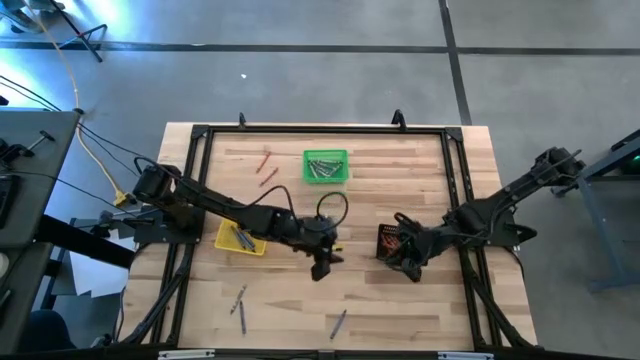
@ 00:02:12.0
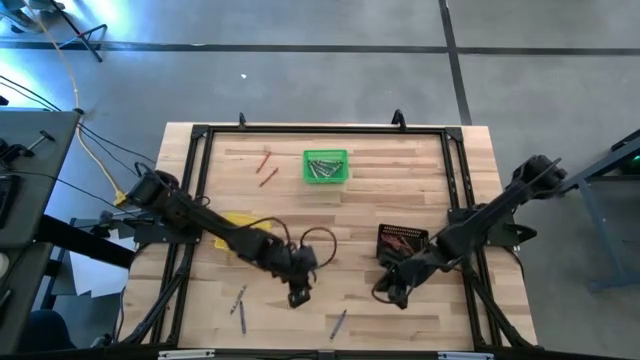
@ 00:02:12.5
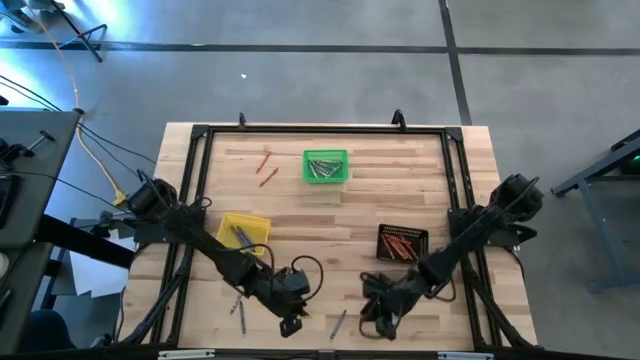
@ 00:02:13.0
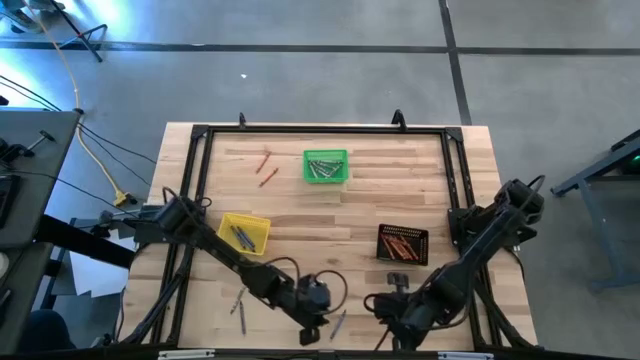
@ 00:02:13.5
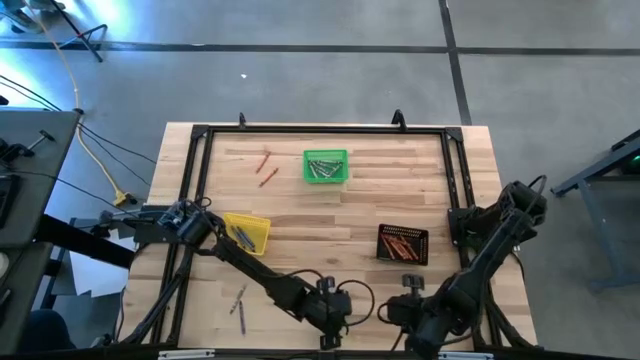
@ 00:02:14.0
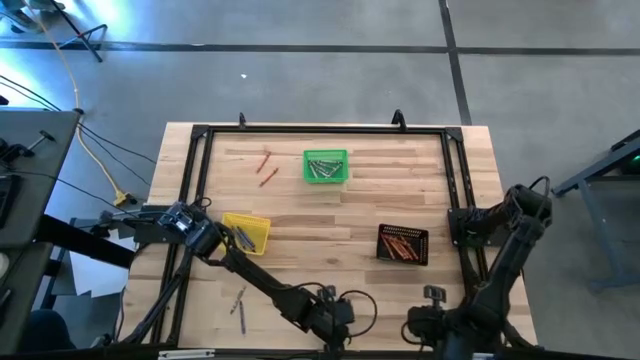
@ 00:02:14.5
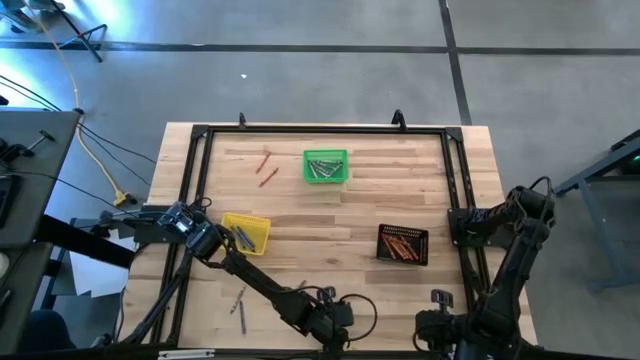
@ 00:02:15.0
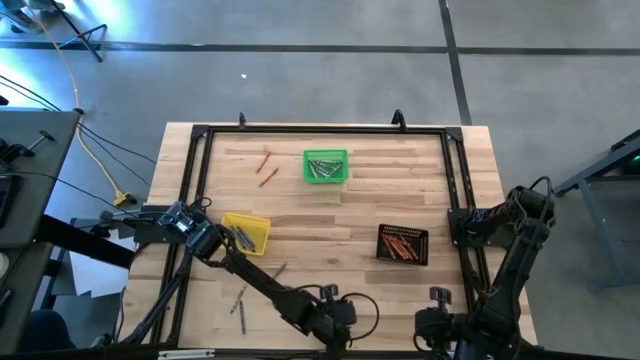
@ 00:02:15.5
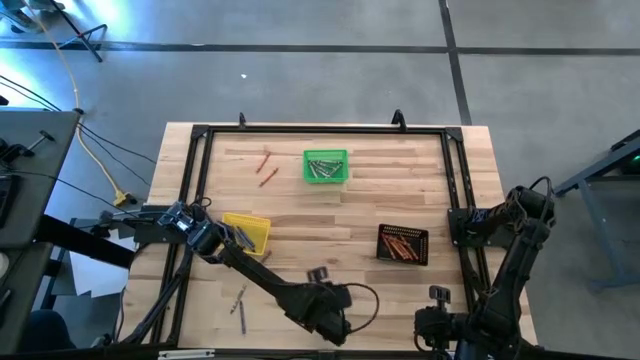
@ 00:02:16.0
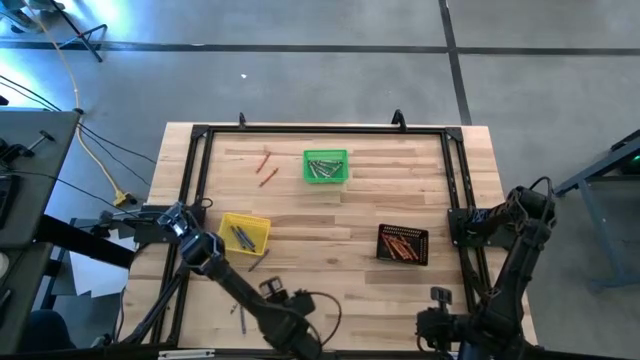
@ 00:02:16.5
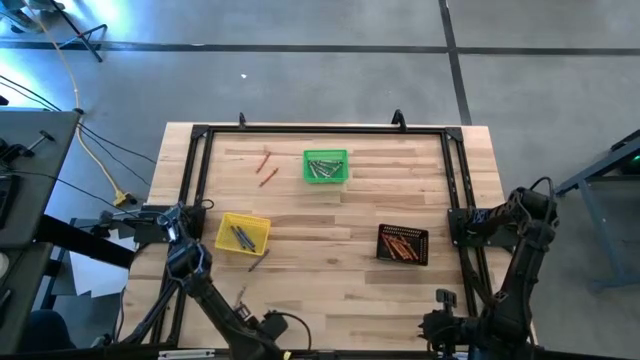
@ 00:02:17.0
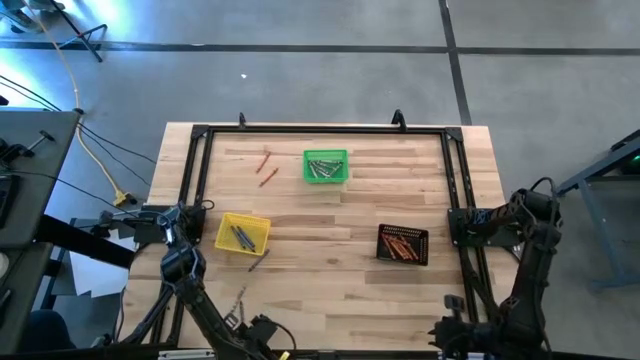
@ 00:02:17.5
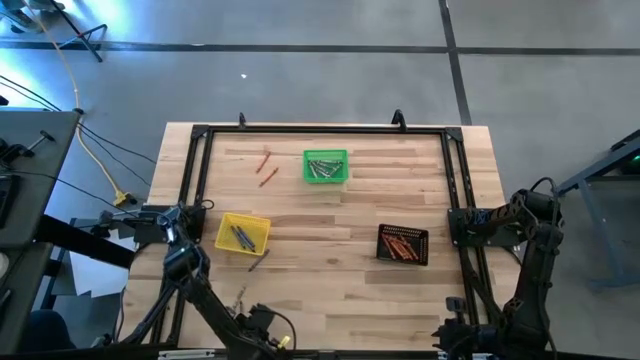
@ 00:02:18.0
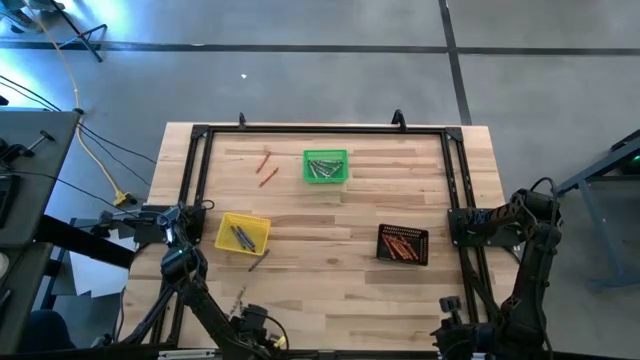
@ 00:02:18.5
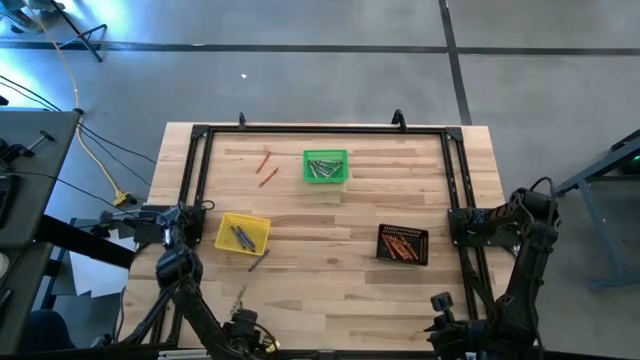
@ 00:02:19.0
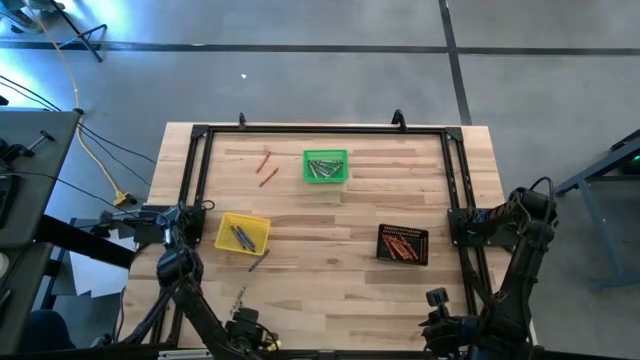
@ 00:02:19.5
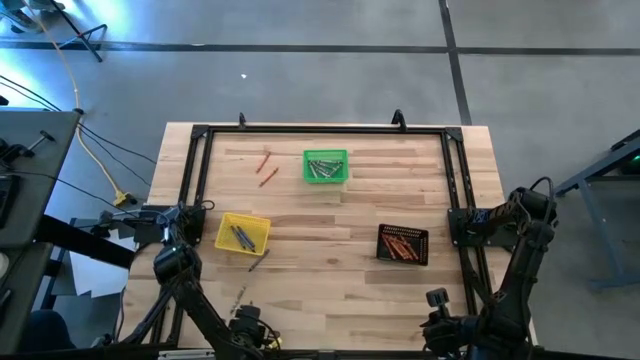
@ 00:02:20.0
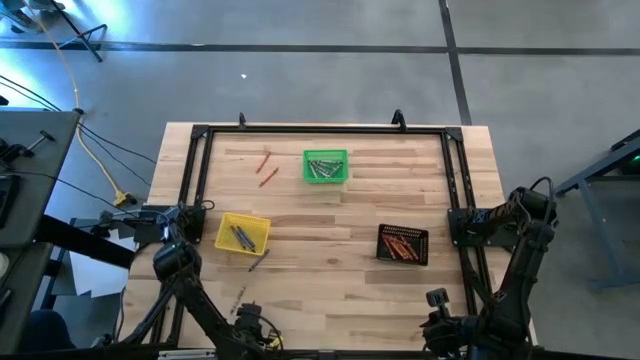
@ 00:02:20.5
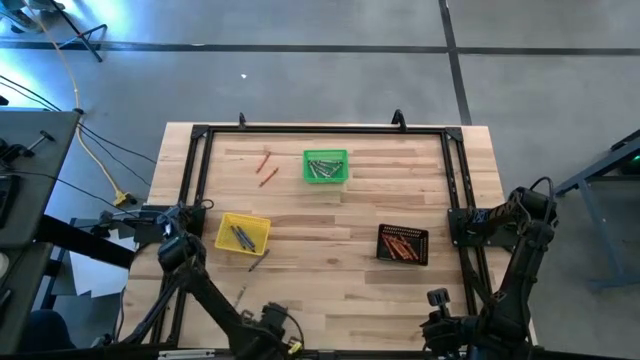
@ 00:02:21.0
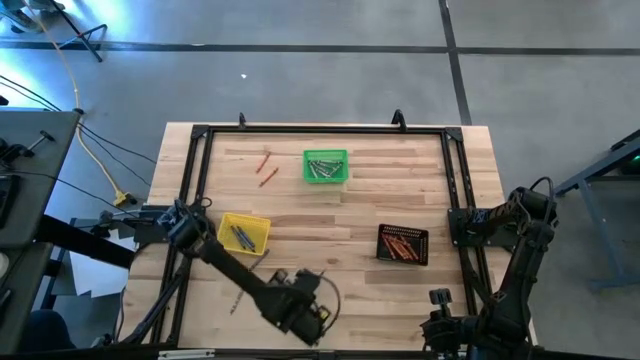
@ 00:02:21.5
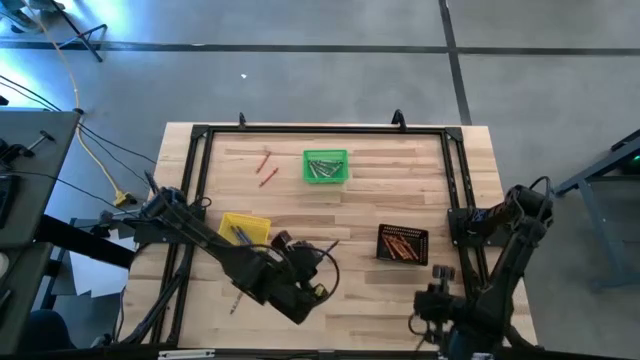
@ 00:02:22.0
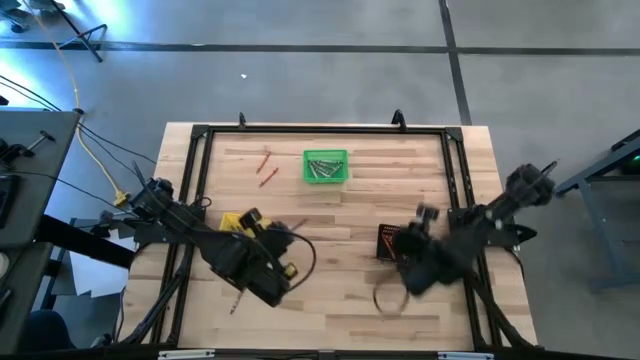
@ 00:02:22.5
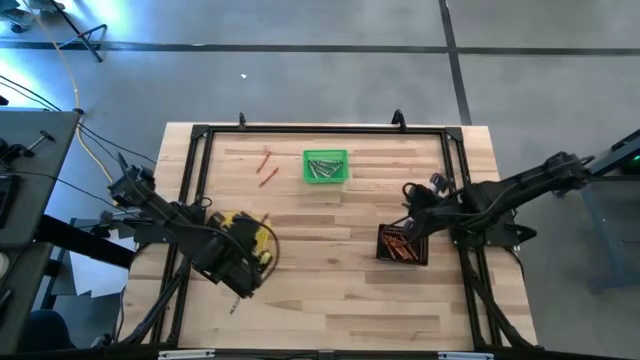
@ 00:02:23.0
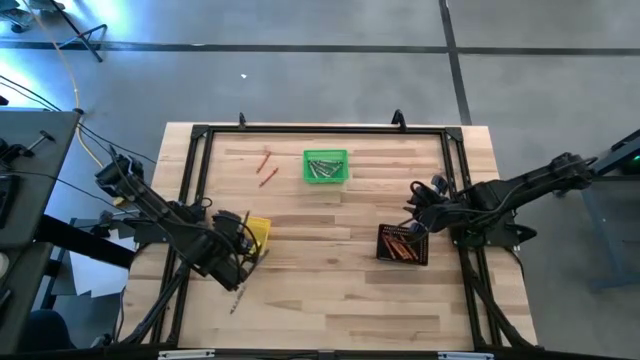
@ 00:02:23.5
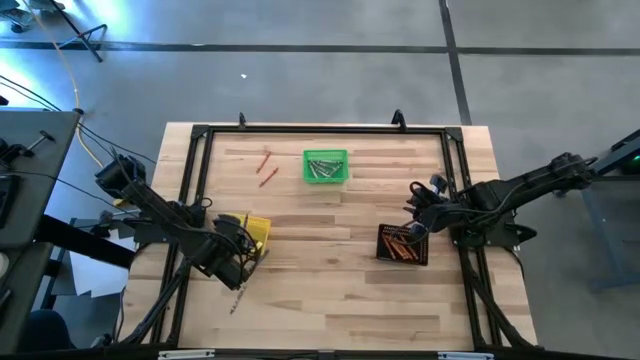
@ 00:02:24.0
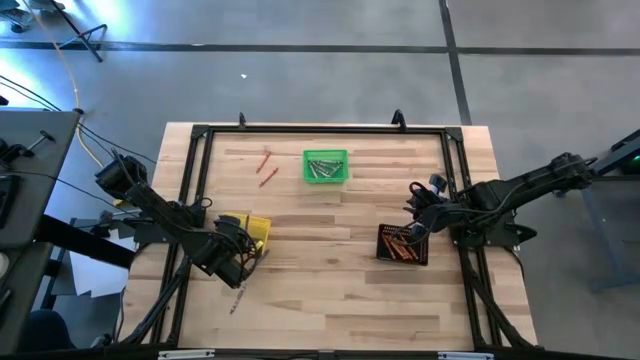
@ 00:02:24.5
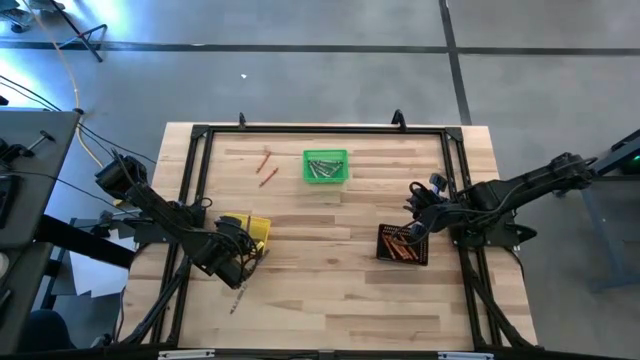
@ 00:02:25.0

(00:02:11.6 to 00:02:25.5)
Task: Sort crayons
Put the blue crayon into the yellow basket

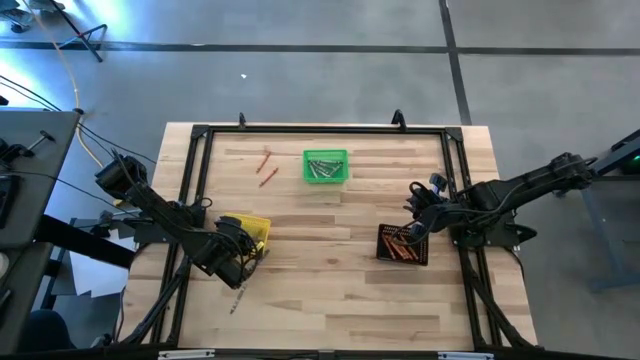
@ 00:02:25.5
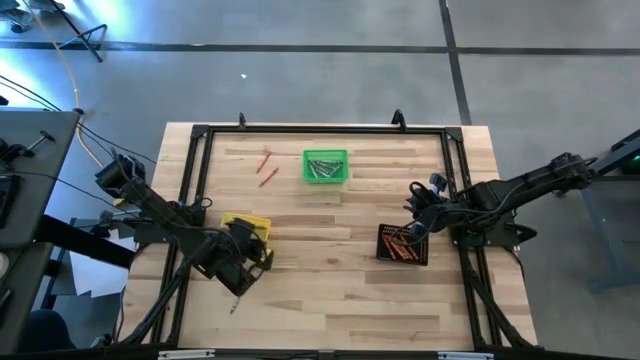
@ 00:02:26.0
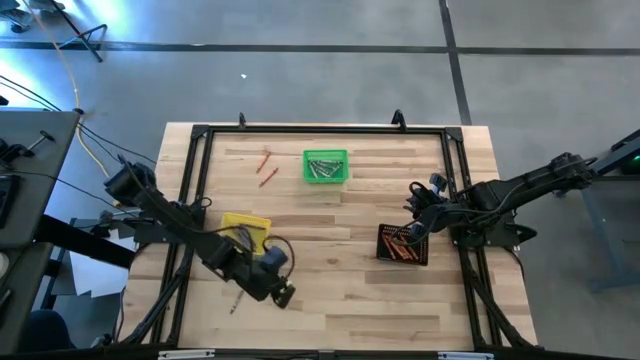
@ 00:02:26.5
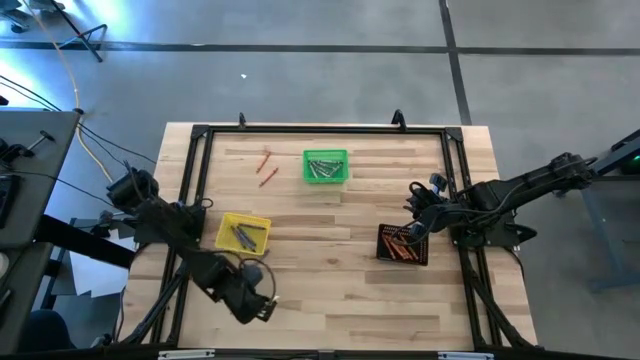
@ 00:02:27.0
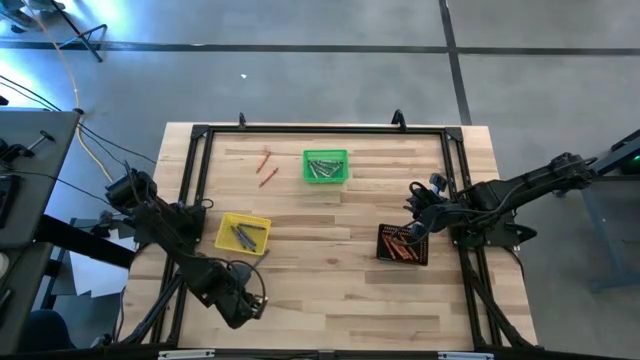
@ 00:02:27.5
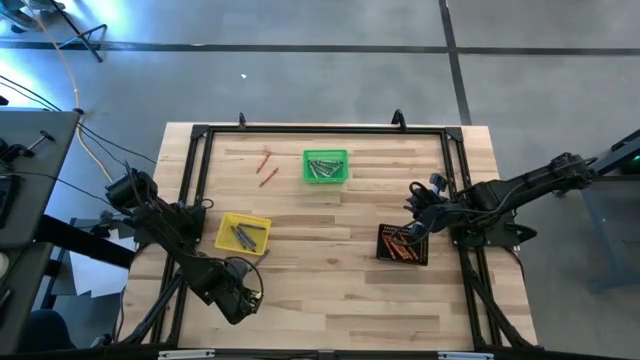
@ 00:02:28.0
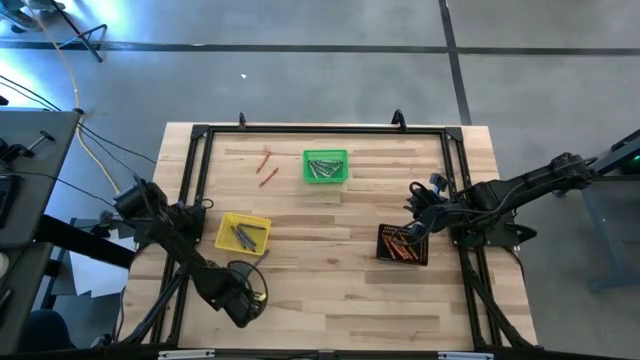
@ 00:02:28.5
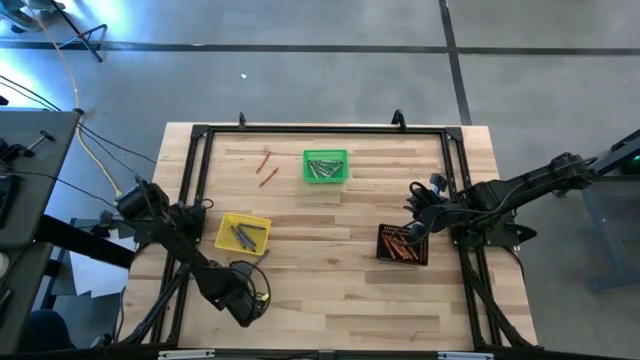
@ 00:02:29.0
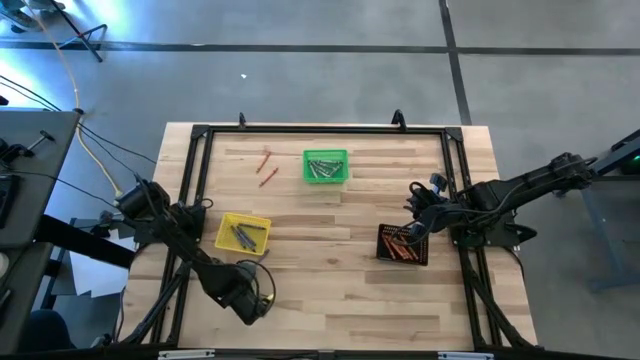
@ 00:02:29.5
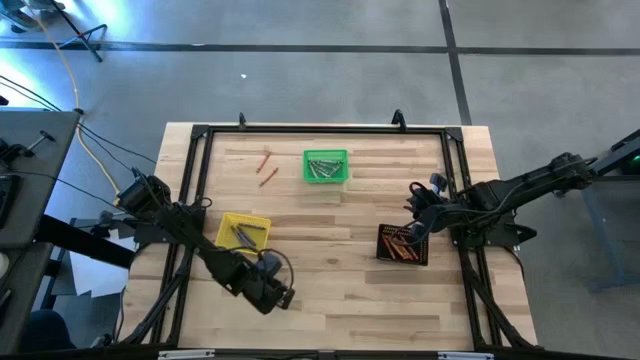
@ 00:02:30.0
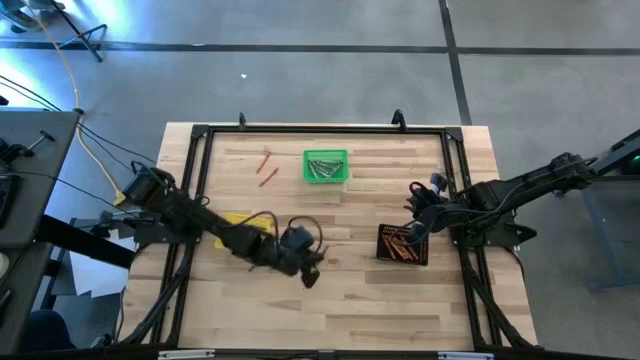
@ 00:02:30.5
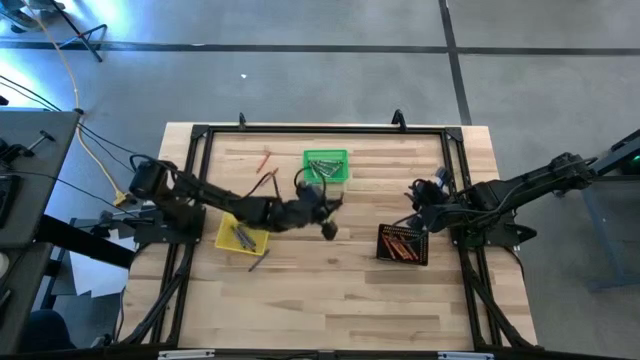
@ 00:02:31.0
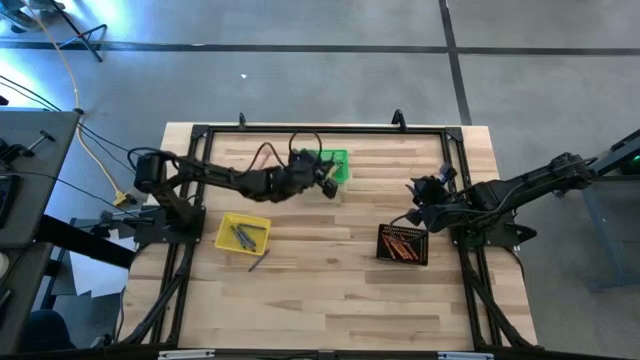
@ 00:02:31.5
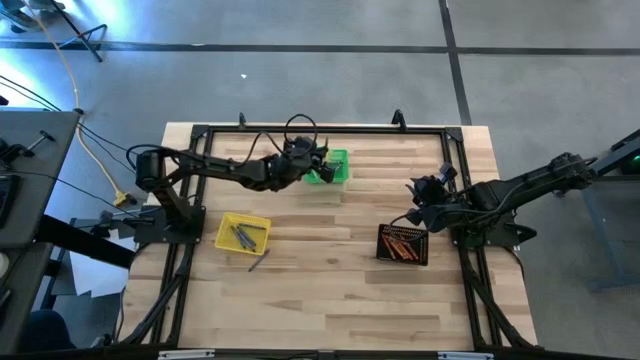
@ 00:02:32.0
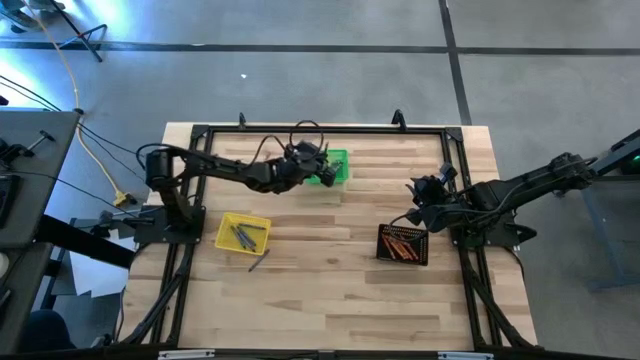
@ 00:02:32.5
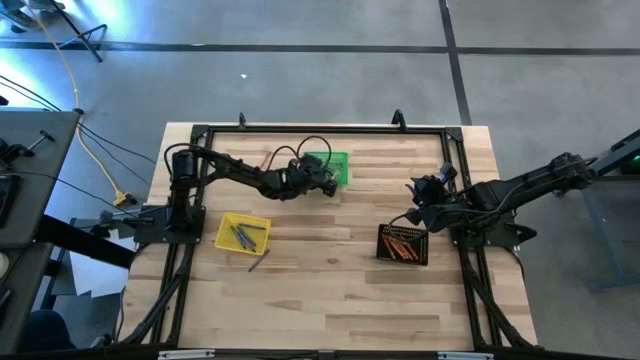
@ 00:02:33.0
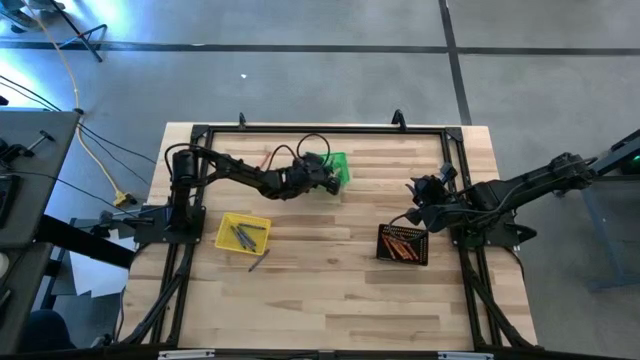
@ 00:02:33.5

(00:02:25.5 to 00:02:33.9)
Put the gray crayon into the green basket
